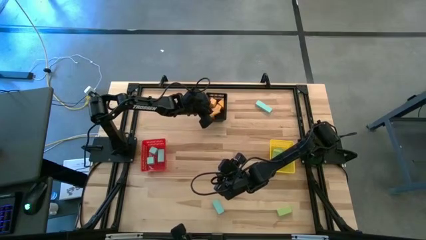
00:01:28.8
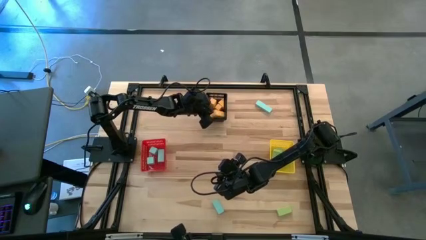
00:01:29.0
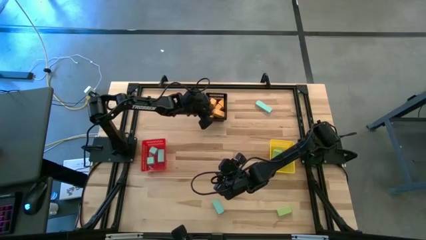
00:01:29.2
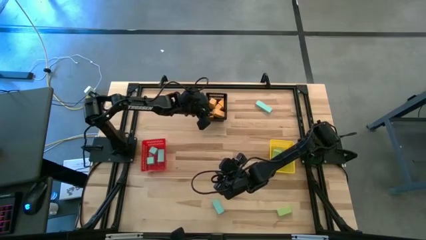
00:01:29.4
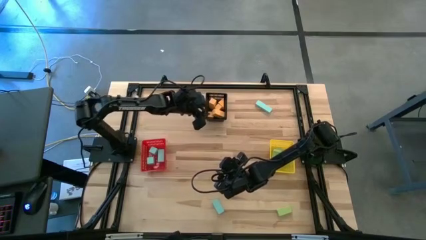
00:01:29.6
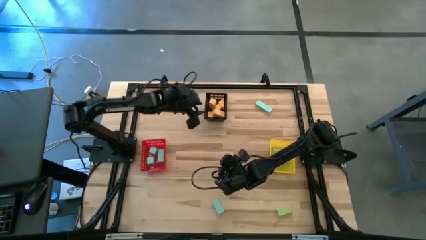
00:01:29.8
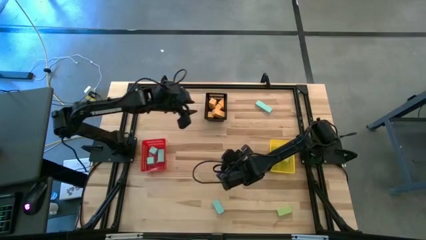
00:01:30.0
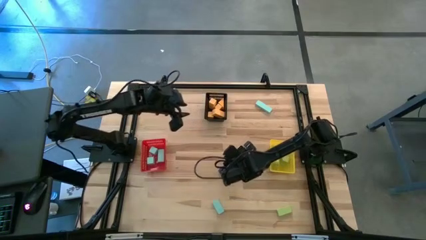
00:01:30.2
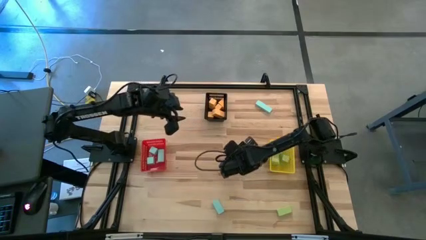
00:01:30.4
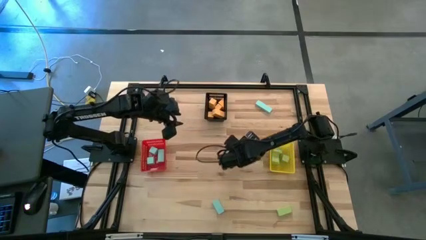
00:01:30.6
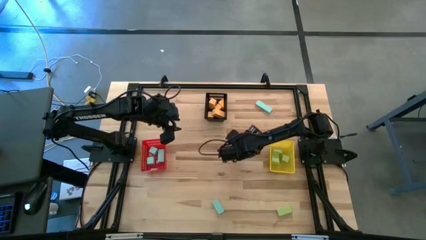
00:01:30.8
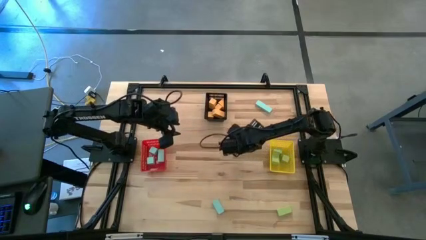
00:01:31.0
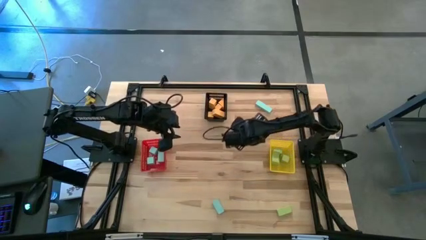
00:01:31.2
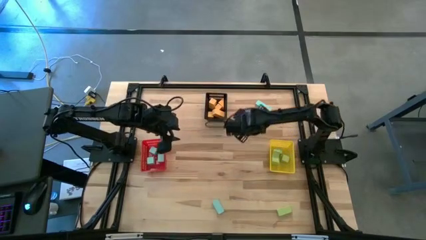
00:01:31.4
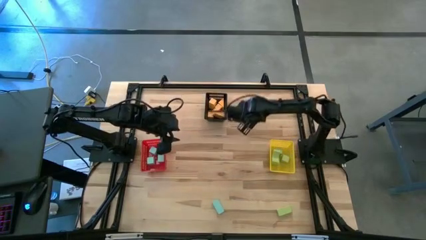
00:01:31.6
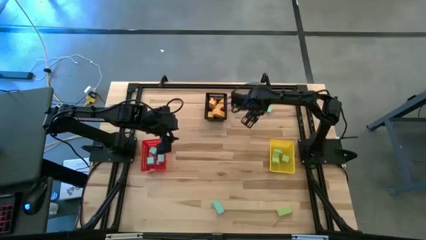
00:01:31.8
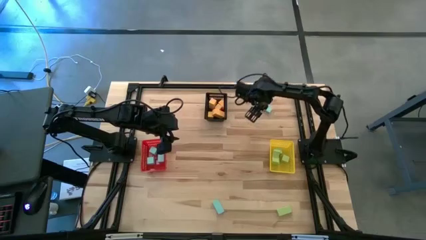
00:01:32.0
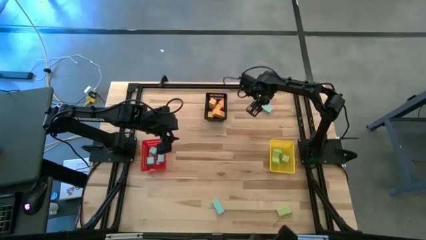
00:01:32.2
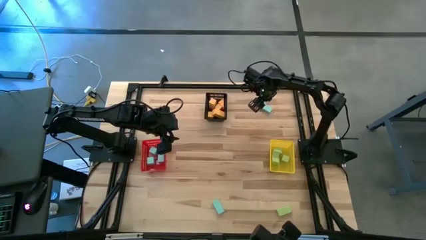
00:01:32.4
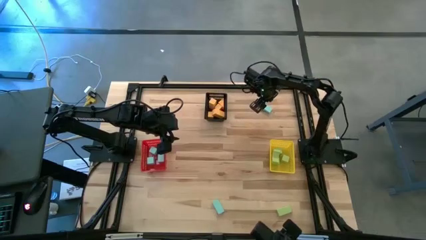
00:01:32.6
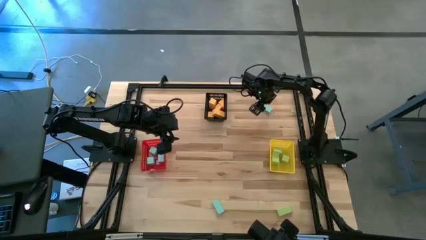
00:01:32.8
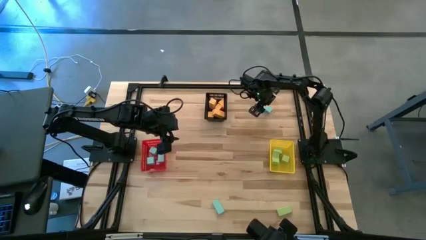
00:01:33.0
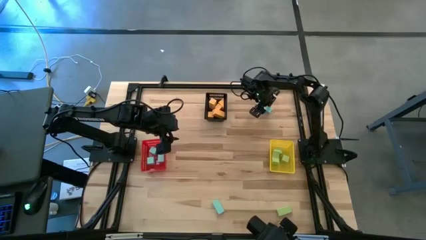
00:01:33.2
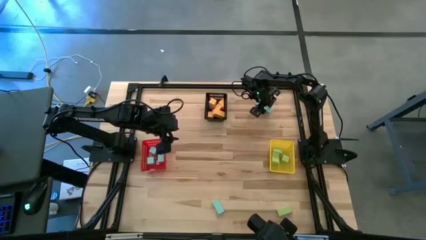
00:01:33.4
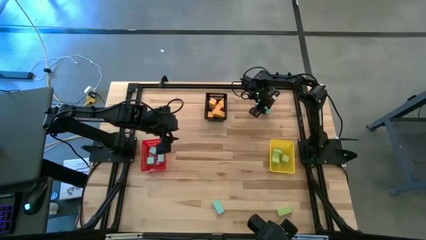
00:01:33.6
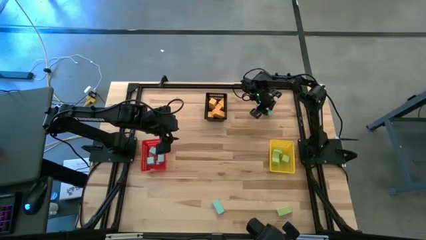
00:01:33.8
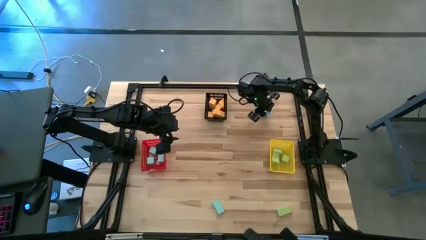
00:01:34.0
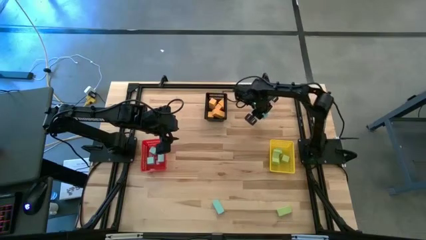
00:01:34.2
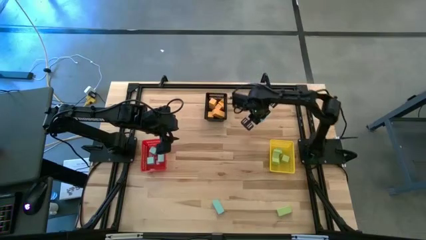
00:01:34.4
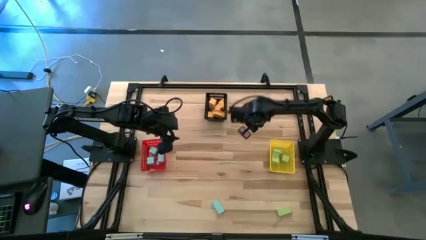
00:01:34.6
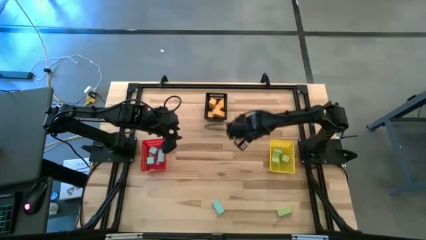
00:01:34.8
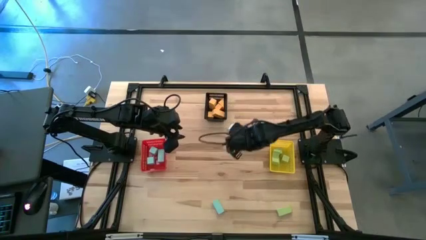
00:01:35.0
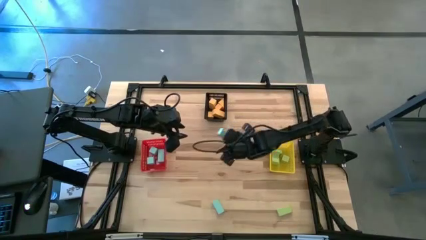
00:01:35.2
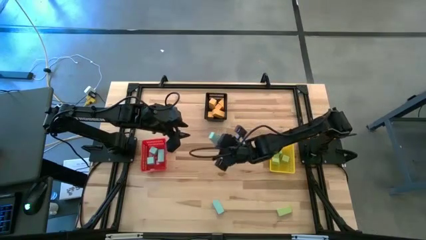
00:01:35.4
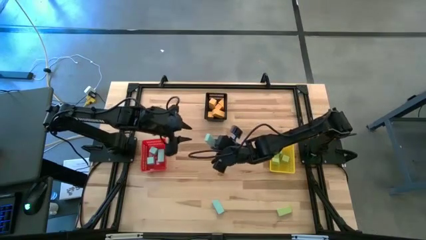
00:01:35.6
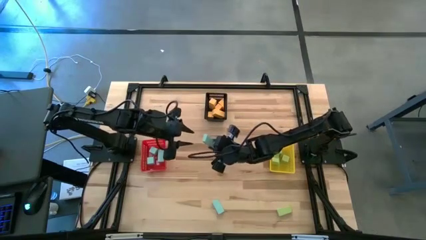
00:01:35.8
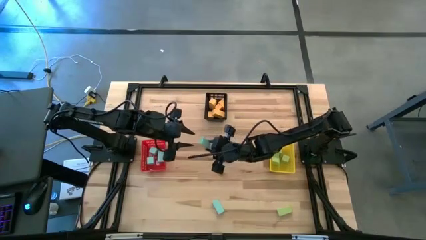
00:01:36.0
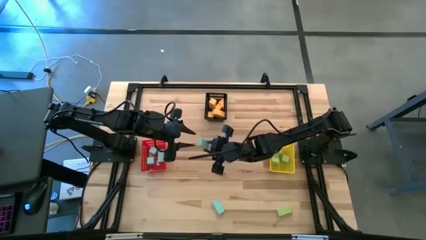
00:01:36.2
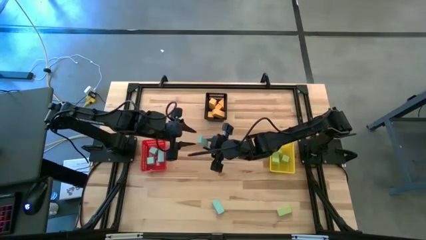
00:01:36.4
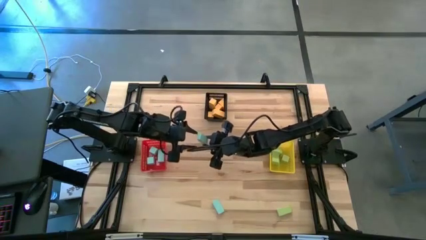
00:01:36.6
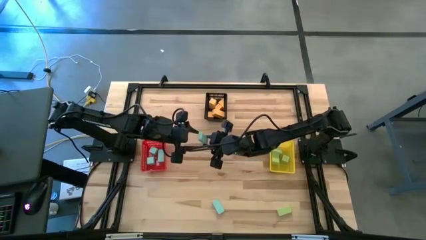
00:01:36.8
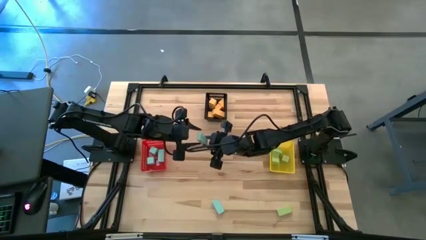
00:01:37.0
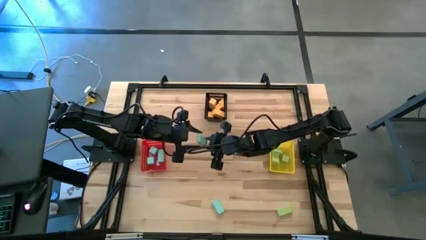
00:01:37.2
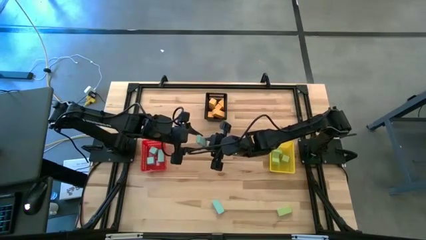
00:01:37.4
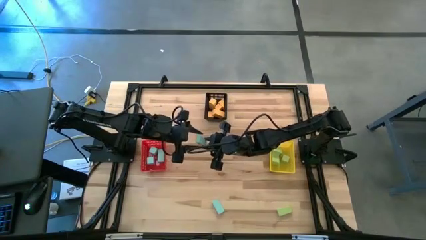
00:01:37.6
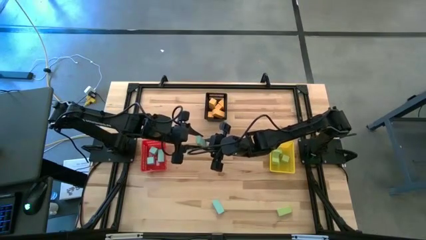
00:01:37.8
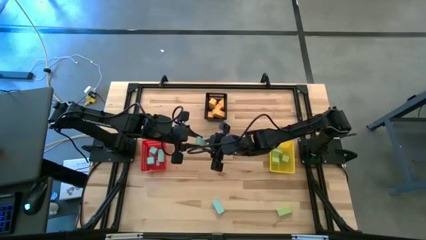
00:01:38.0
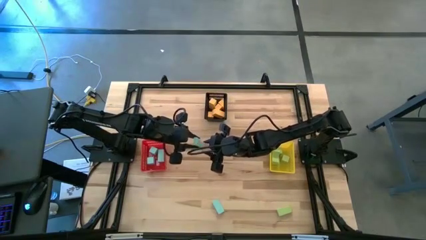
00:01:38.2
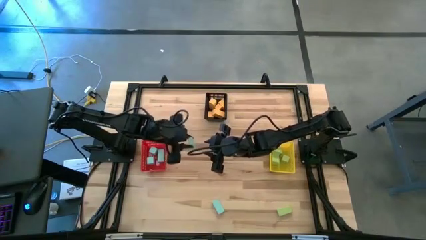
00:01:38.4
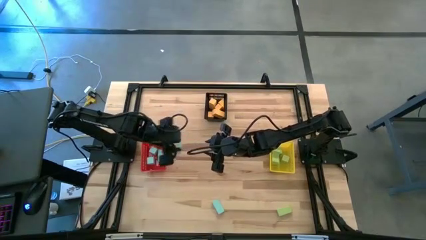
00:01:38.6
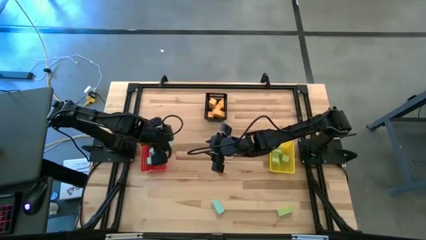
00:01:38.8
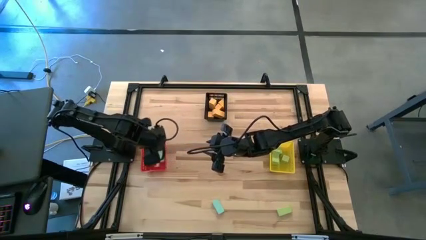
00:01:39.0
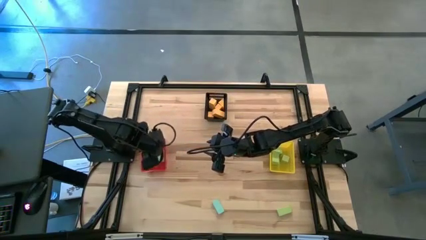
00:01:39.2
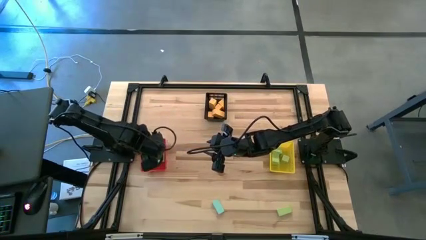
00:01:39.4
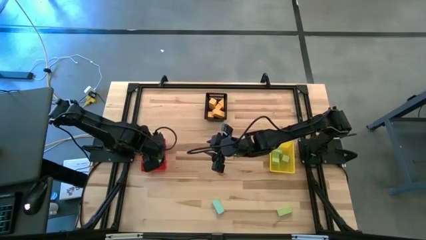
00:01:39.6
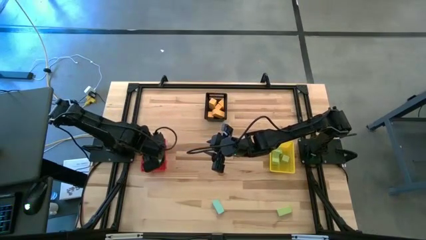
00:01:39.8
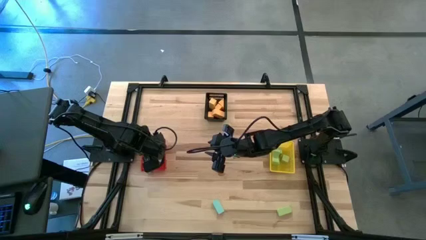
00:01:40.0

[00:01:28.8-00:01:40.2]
Task: Sort & place blocks by color
Put the blue block into the red bin

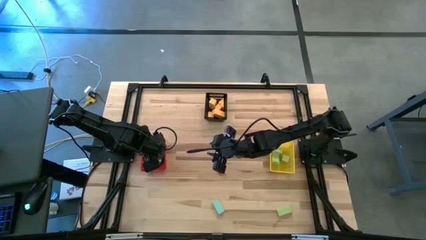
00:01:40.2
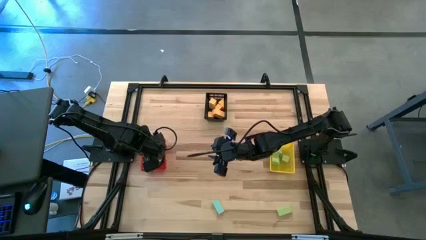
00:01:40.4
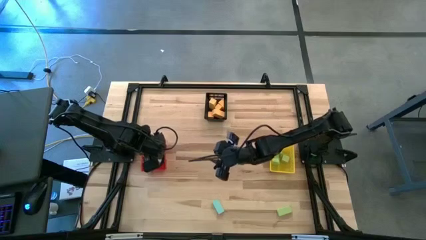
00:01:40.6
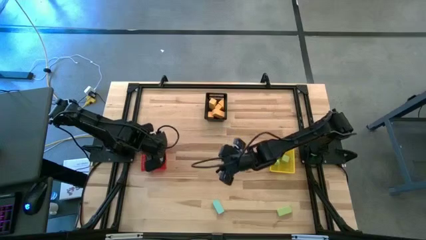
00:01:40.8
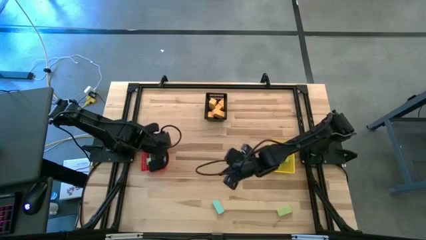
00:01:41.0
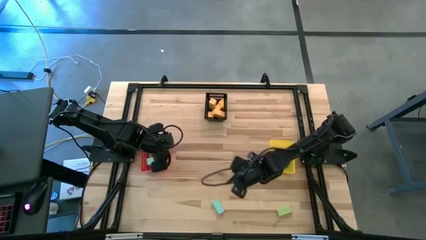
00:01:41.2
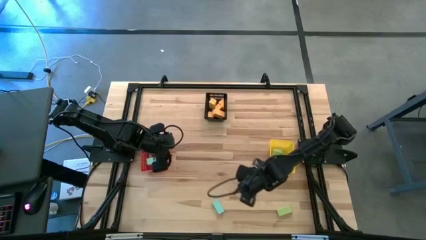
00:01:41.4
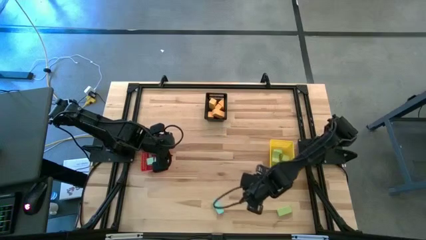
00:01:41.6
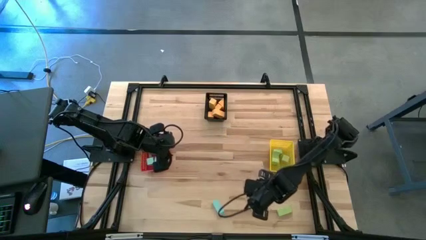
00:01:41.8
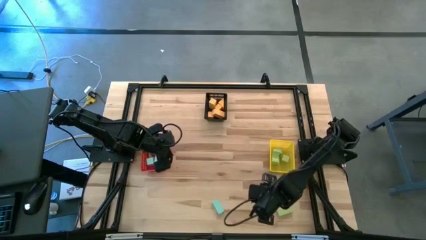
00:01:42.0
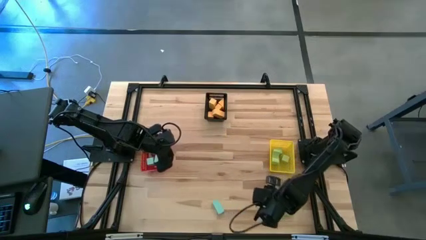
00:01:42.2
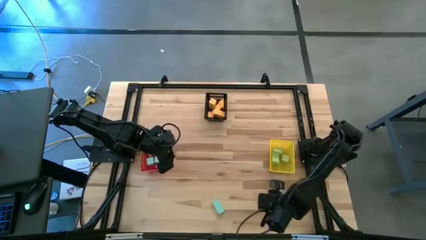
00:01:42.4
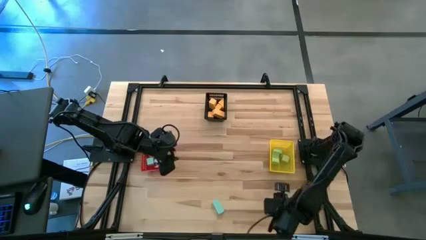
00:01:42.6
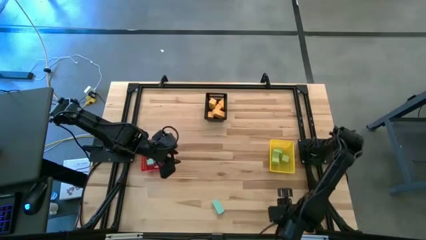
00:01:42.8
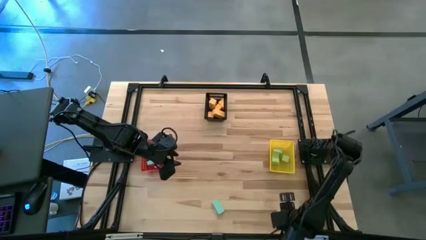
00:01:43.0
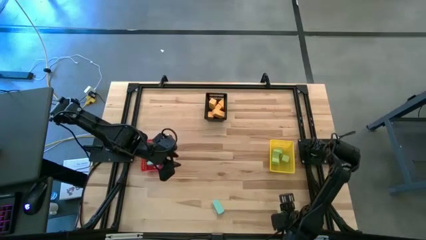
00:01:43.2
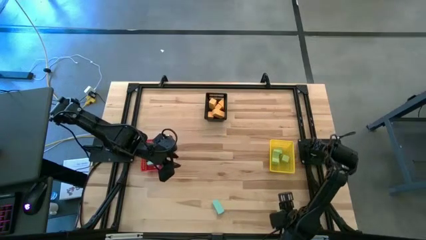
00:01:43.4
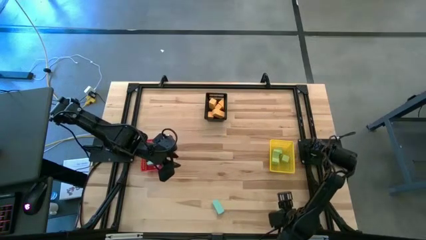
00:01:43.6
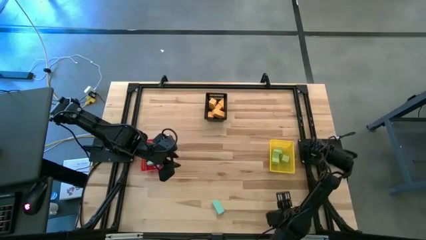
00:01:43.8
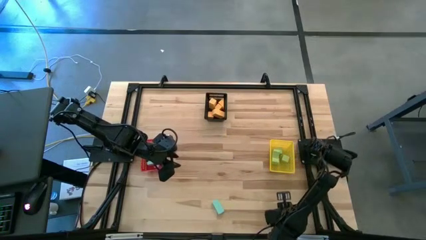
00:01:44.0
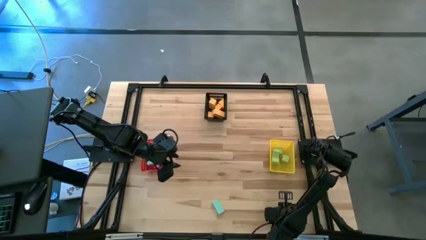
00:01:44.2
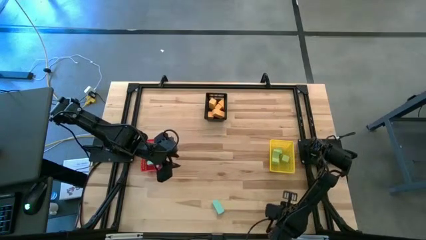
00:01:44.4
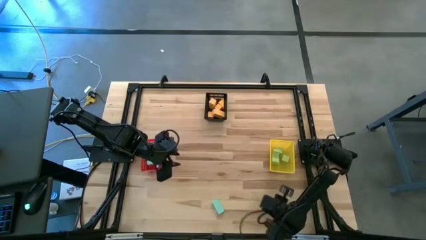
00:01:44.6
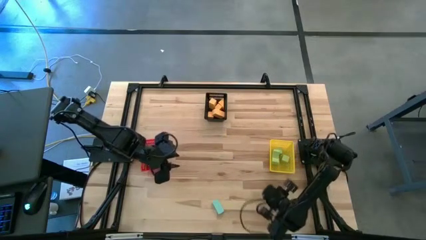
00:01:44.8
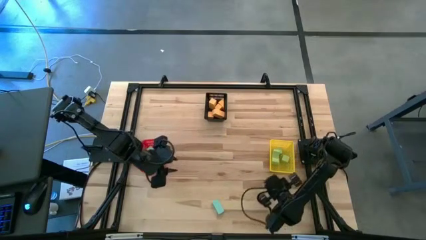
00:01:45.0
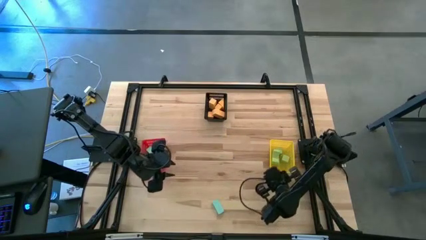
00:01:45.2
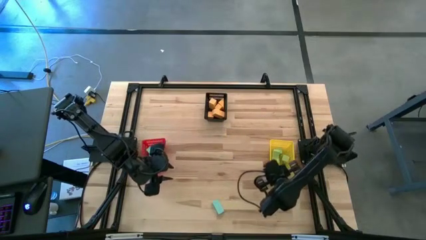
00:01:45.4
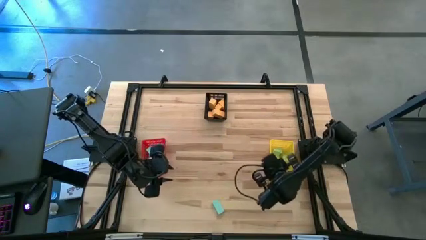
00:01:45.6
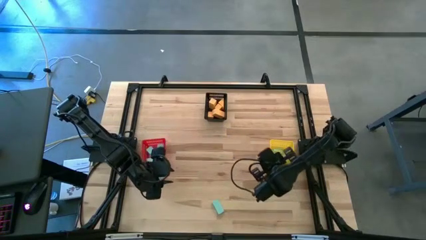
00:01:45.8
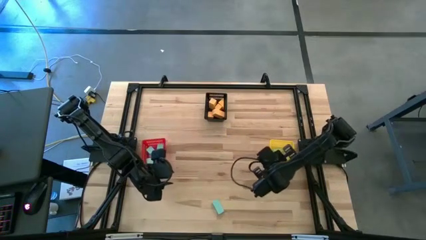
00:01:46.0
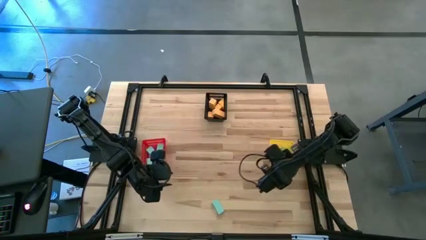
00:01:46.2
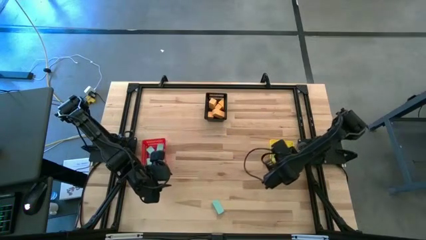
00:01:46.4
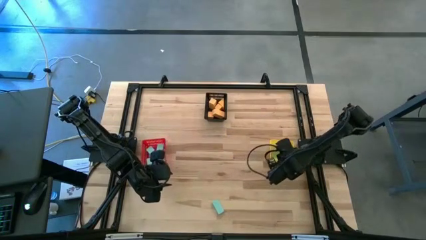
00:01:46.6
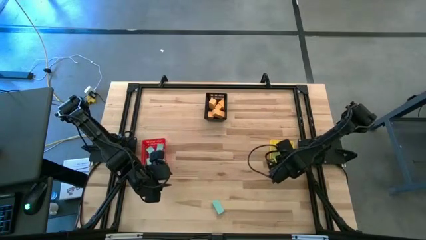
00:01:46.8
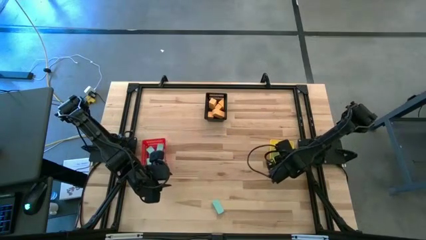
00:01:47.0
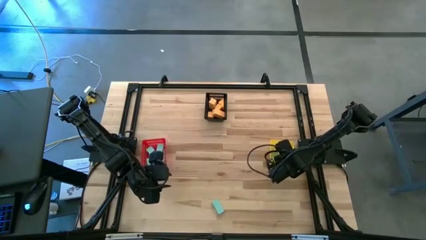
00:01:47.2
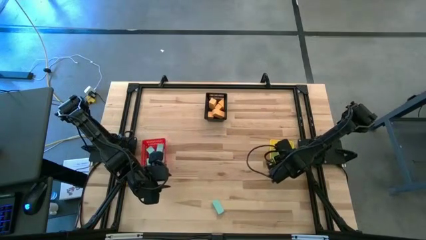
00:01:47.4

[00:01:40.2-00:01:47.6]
Put the green block into the yellow bin
